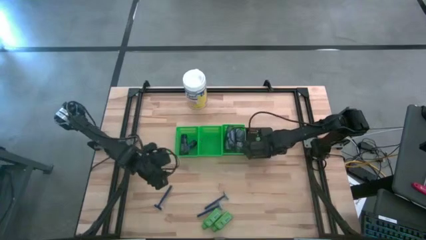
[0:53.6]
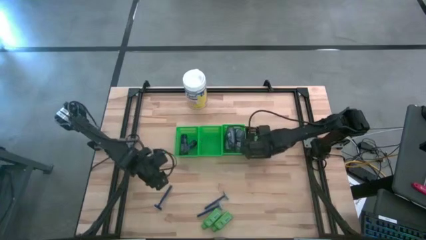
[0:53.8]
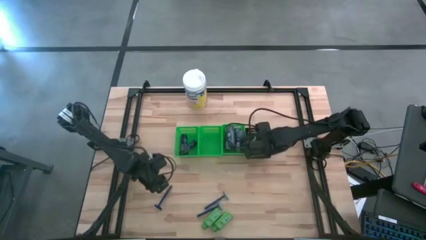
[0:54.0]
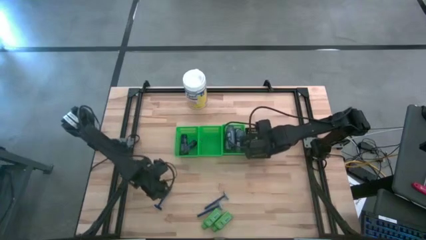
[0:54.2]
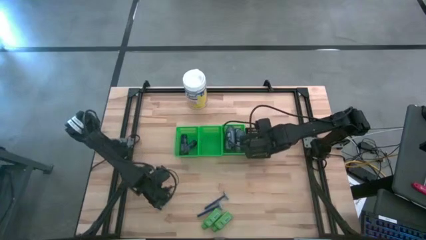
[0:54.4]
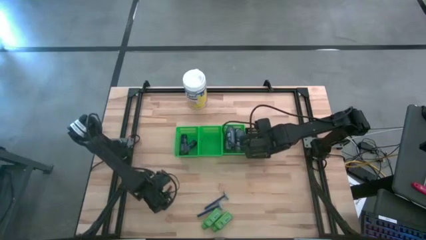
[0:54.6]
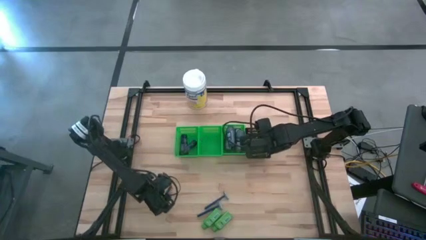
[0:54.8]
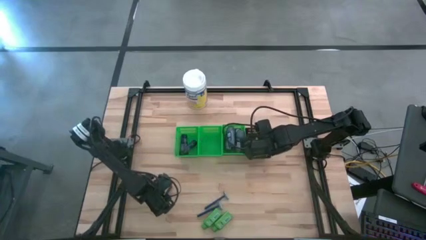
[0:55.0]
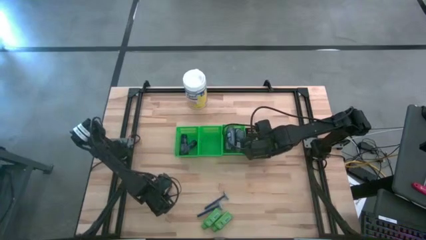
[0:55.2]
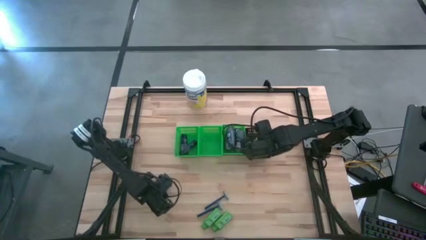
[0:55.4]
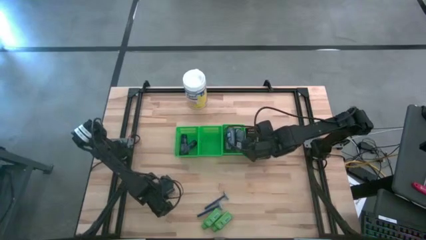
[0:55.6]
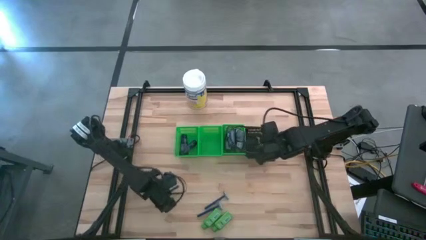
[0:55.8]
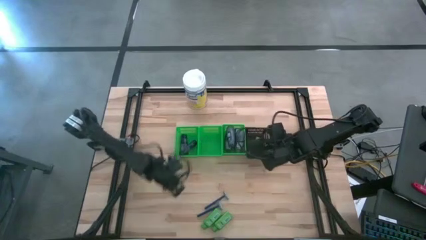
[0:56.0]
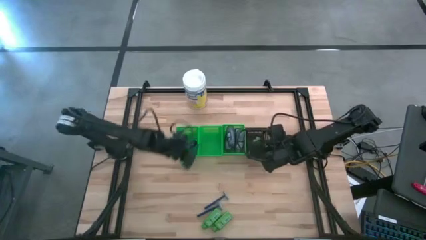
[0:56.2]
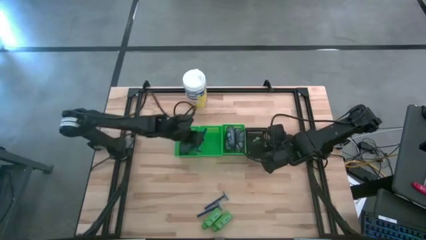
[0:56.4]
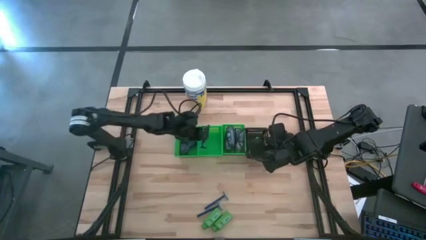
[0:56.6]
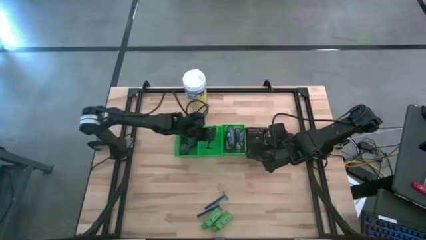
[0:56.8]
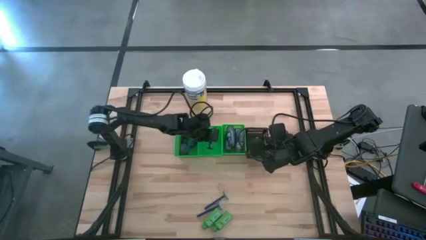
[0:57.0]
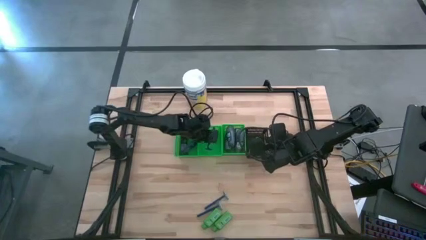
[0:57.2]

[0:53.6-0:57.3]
Task: Pick & Place Travel size toiletries
Put the blue razor into the middle green bin

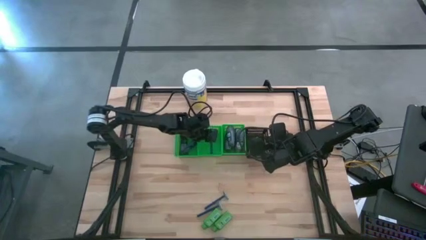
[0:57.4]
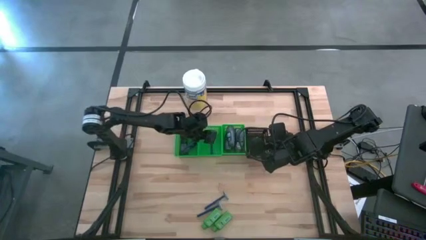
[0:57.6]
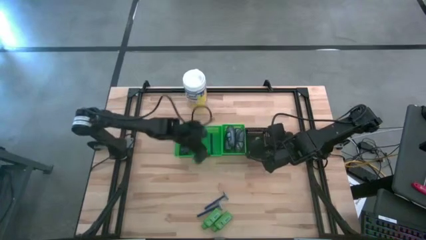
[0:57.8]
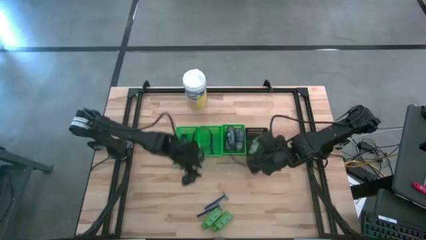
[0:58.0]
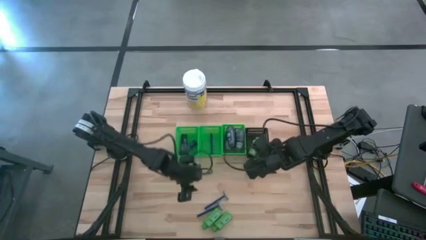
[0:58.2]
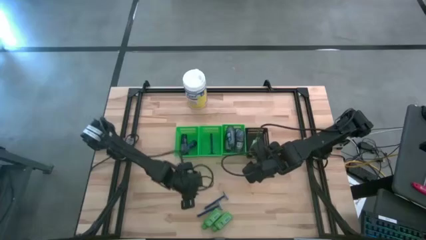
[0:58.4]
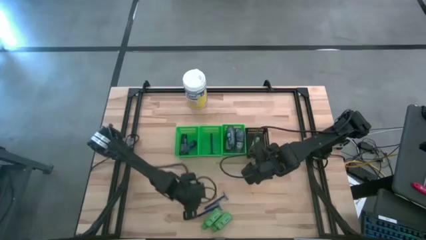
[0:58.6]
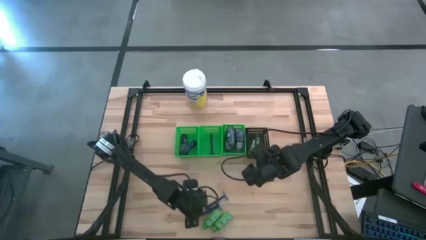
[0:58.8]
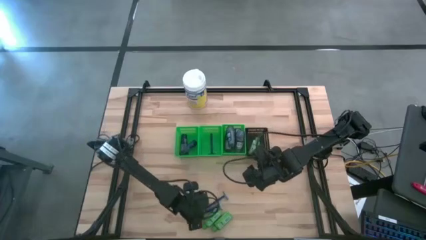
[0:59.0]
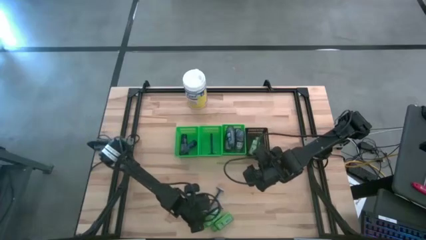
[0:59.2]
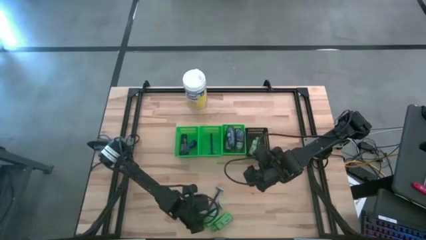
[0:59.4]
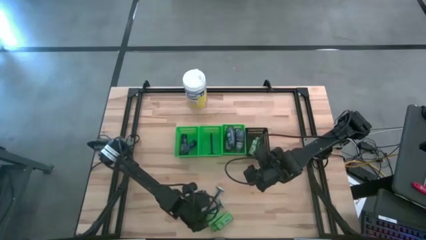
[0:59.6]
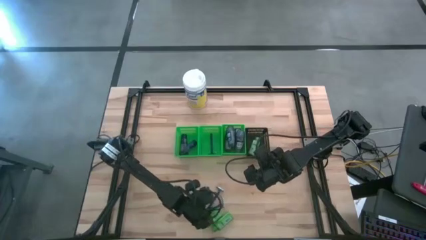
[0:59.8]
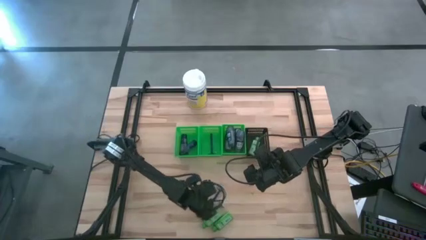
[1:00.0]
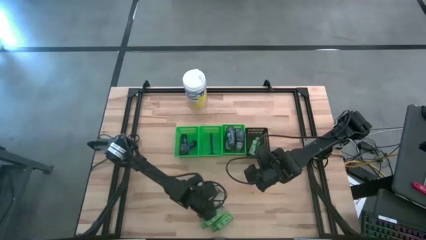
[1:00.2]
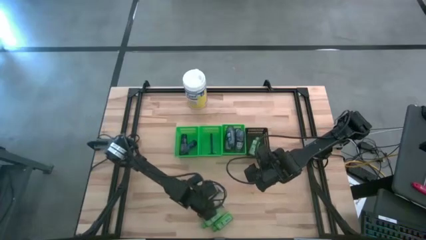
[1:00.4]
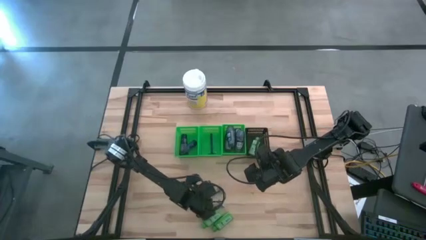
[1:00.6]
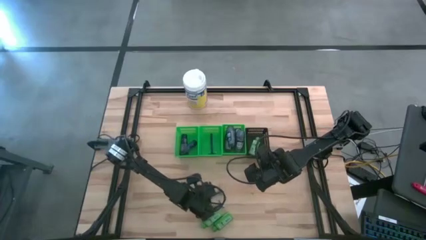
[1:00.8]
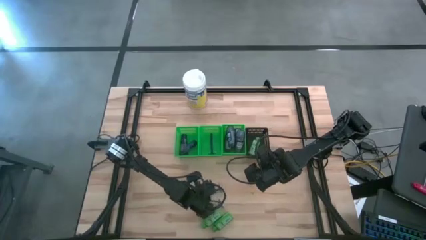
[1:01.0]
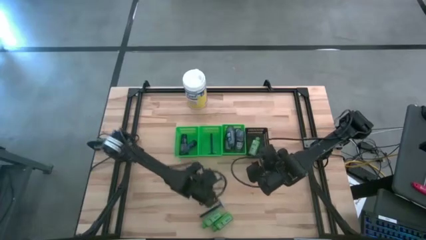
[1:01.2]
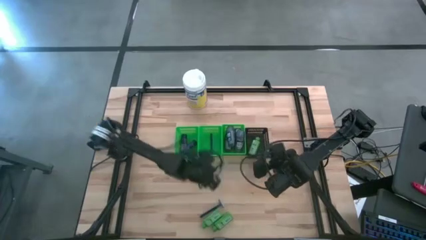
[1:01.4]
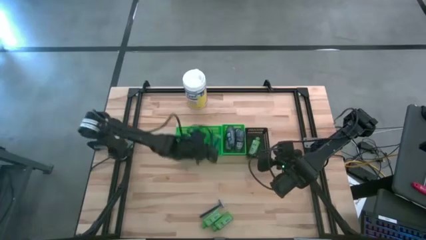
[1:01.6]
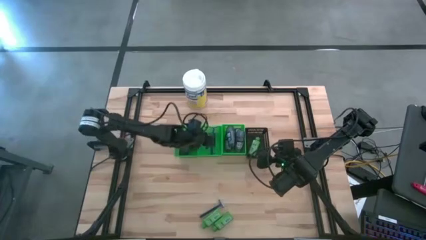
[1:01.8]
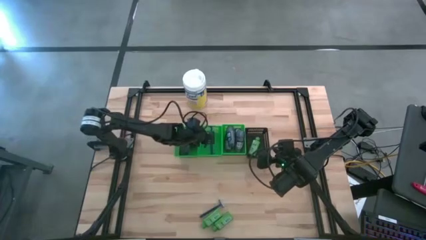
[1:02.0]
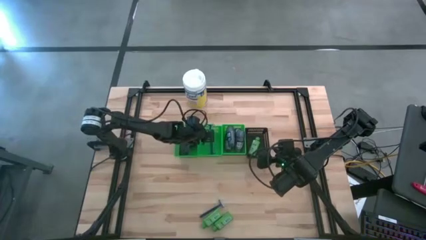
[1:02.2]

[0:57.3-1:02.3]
Put the blue razor into the middle green bin

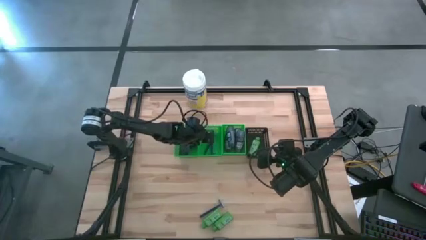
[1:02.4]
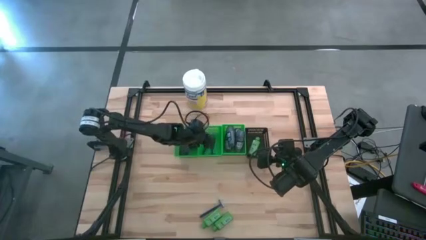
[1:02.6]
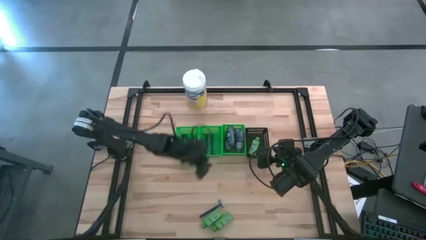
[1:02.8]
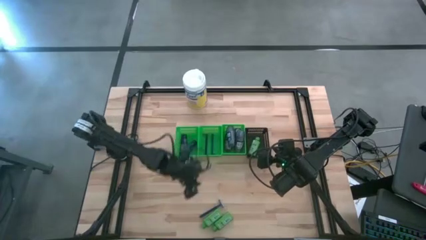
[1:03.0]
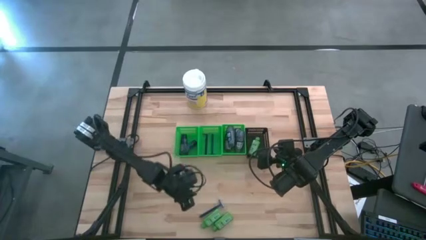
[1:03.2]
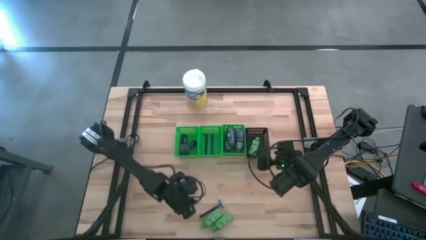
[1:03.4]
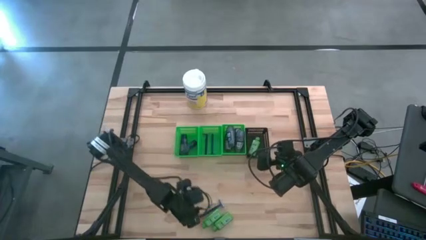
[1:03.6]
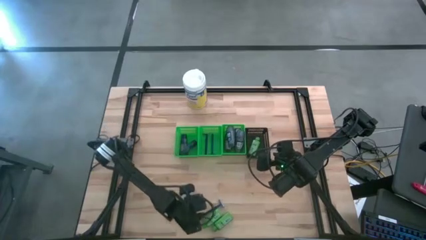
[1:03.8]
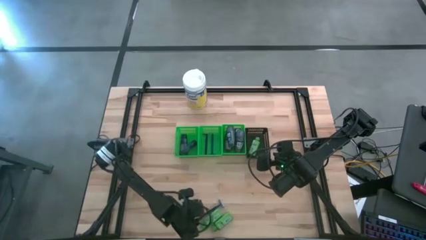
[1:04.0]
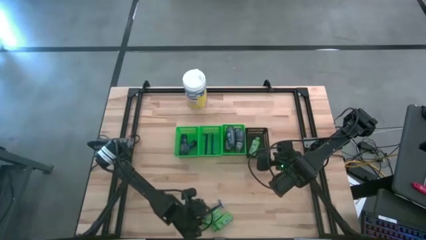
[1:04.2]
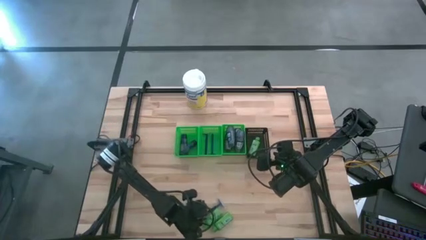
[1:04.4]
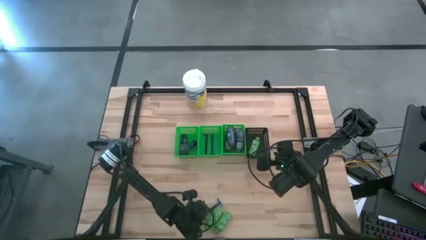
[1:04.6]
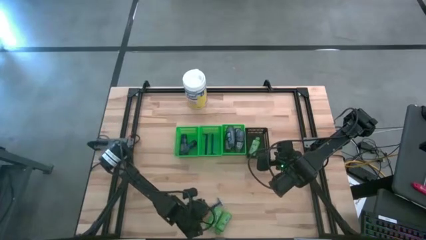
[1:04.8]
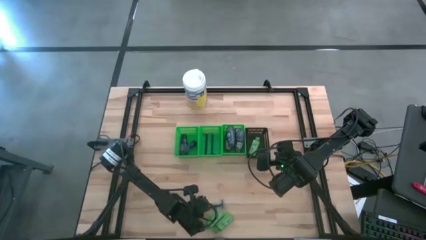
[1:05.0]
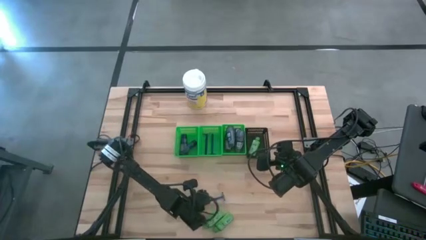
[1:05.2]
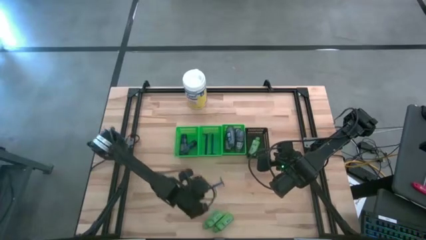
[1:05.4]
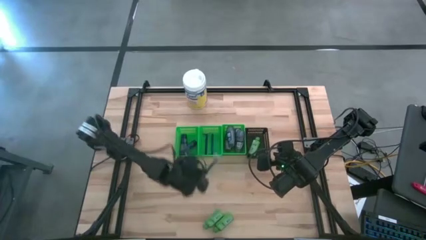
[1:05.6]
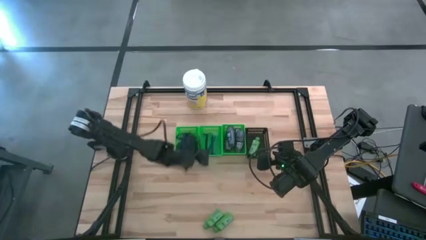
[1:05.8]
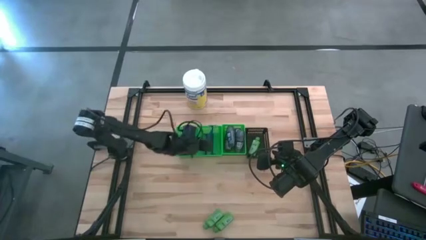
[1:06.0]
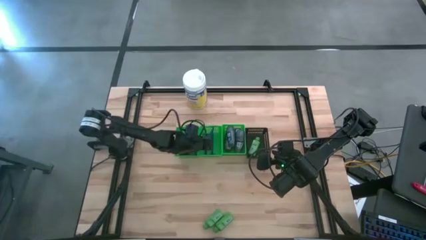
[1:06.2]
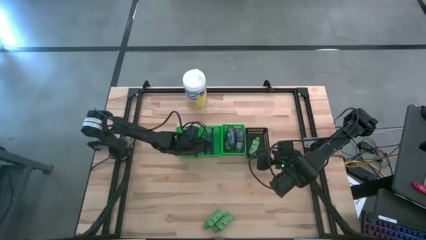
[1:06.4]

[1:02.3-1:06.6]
Put the blue razor into the middle green bin

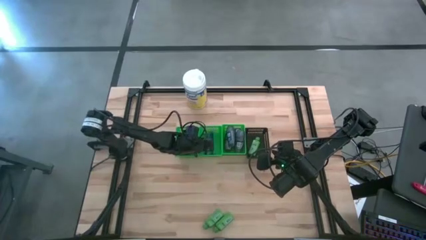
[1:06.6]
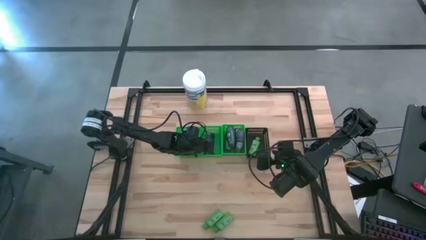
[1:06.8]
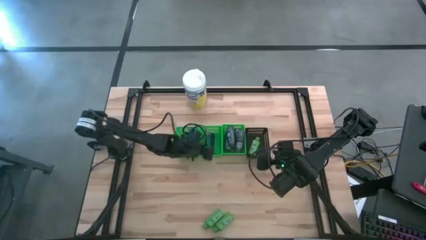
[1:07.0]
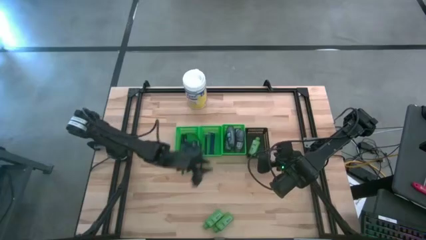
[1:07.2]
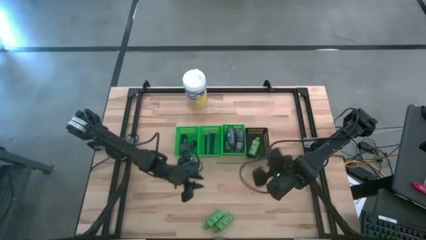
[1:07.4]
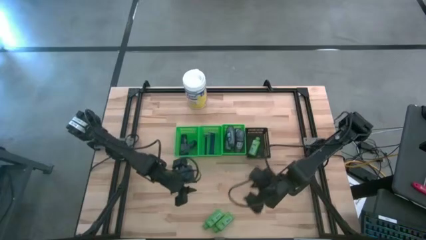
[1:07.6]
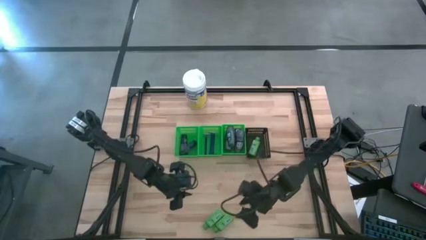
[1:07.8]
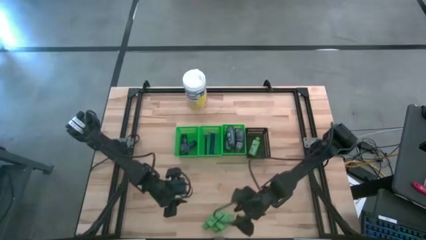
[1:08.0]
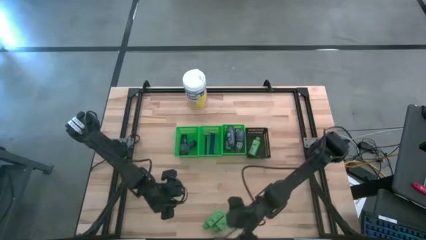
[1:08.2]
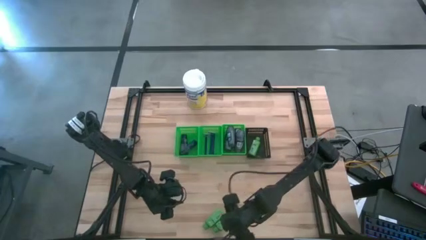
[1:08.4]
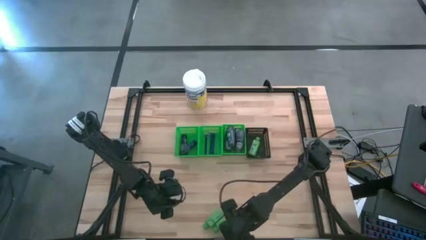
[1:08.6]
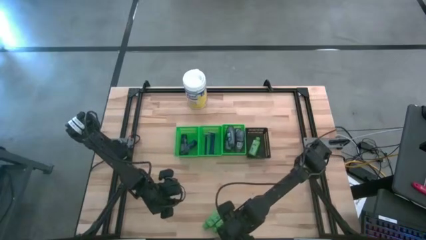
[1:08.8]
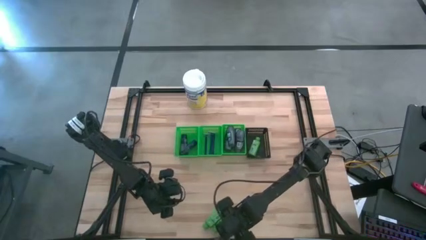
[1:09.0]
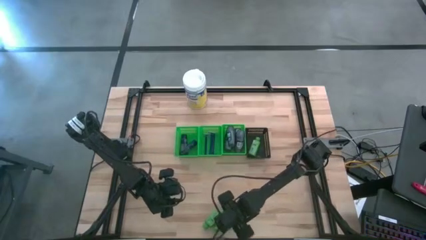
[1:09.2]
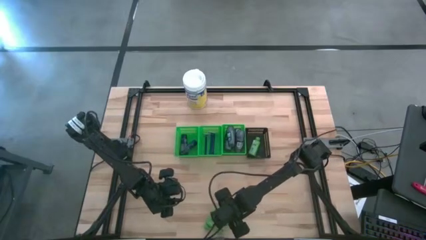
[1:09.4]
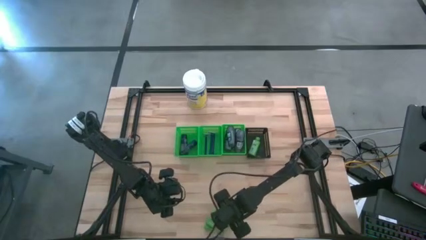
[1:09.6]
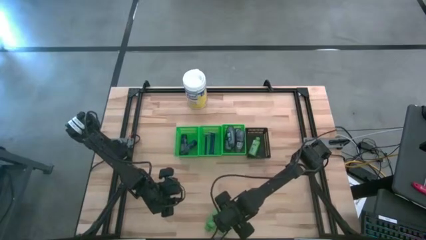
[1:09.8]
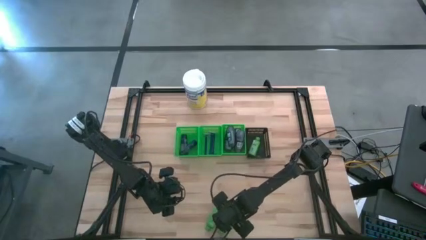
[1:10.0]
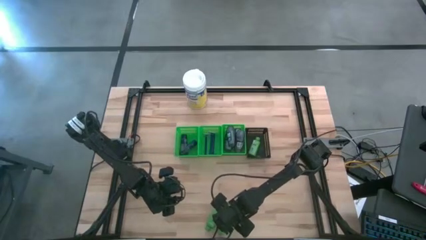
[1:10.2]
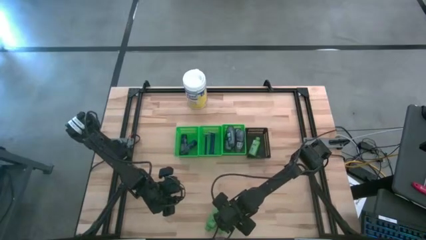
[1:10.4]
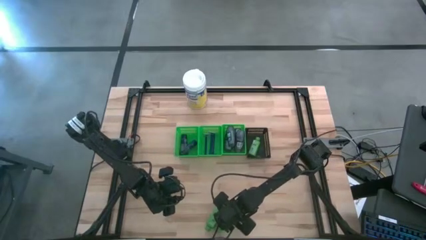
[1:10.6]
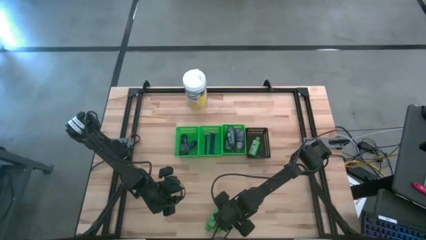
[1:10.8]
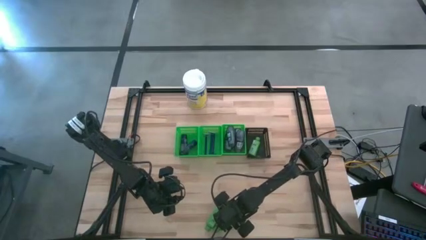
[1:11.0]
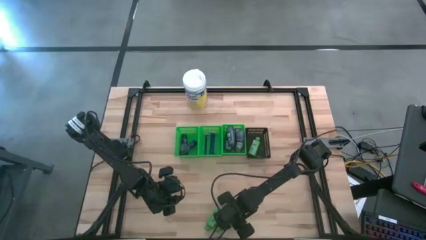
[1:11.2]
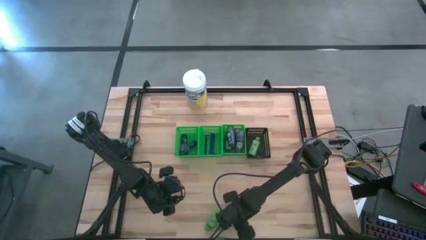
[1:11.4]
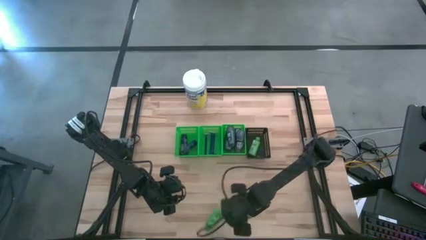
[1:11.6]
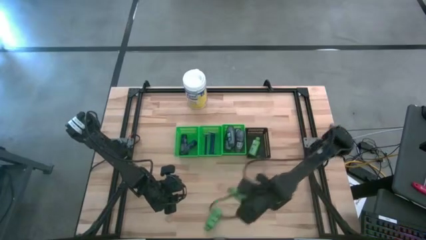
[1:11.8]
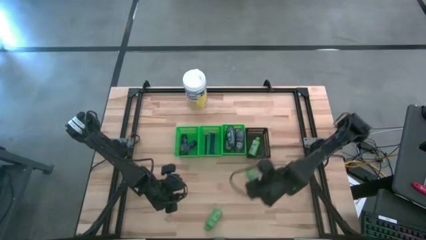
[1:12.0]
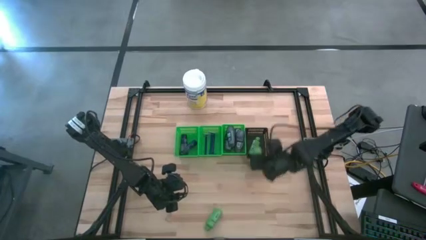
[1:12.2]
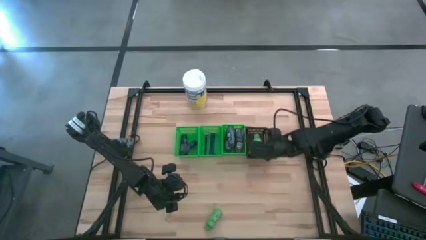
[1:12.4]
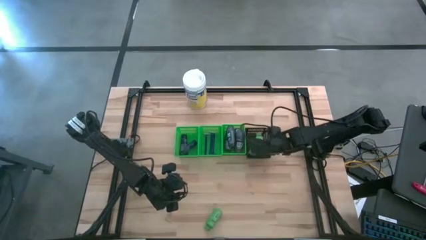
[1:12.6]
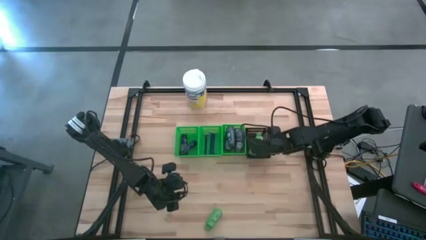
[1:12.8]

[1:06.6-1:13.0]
Put the green shampoo into the black bin
